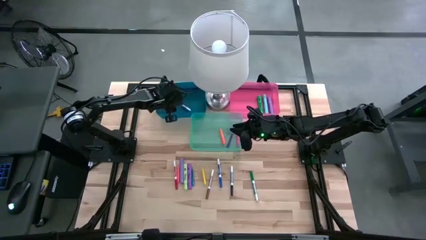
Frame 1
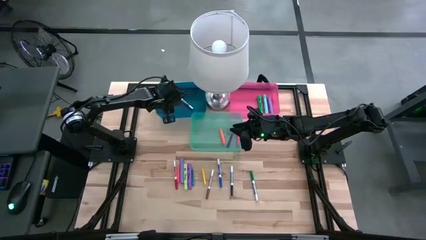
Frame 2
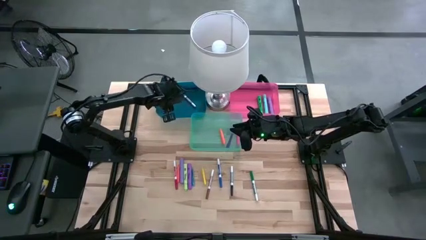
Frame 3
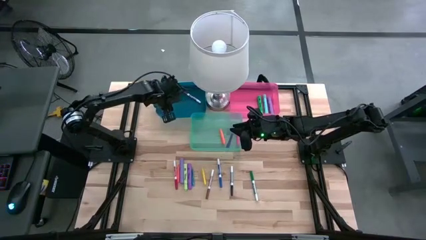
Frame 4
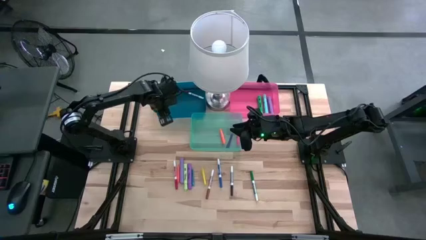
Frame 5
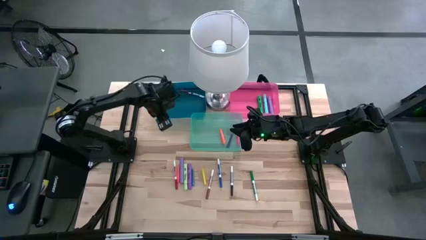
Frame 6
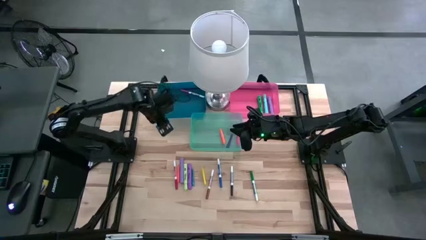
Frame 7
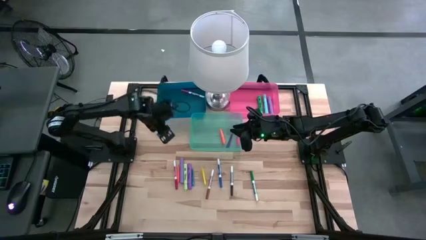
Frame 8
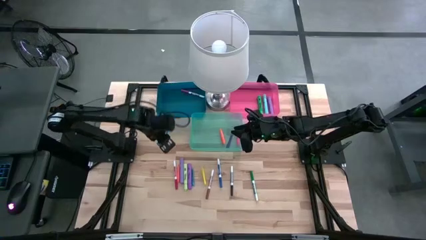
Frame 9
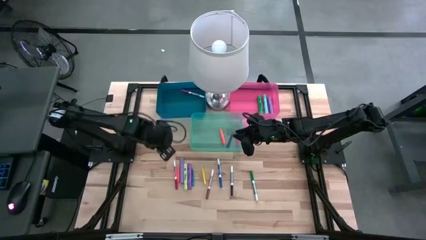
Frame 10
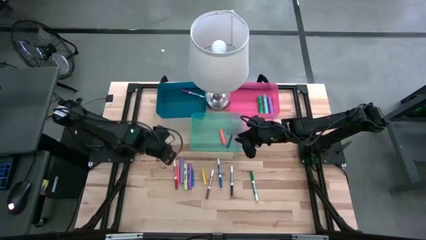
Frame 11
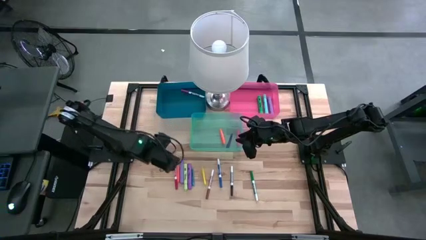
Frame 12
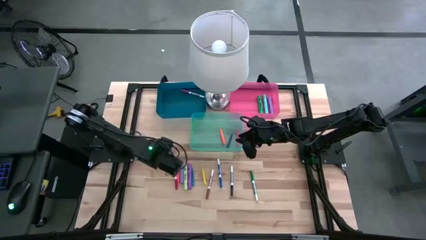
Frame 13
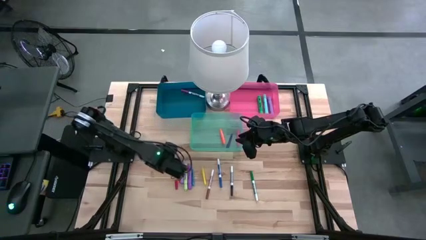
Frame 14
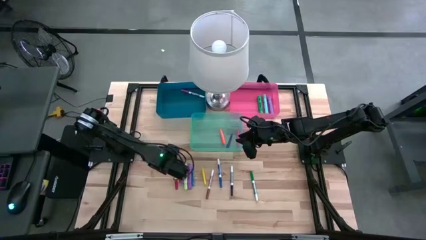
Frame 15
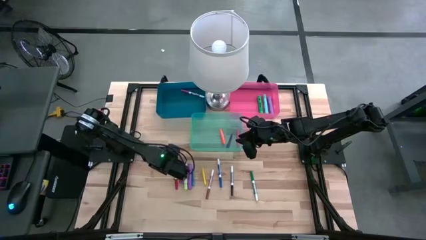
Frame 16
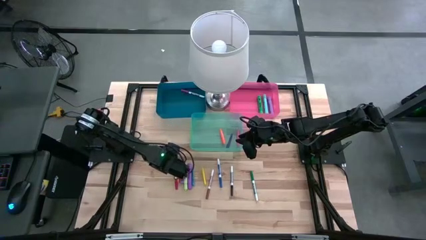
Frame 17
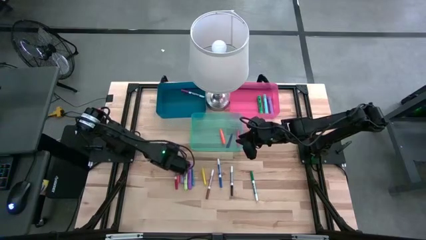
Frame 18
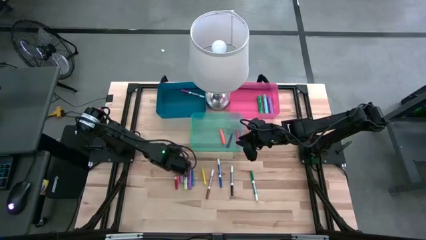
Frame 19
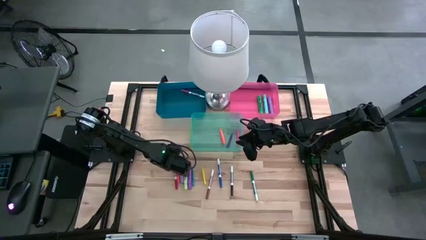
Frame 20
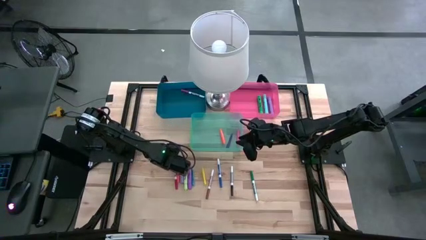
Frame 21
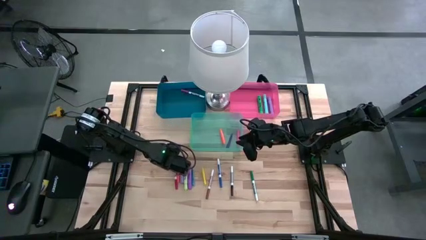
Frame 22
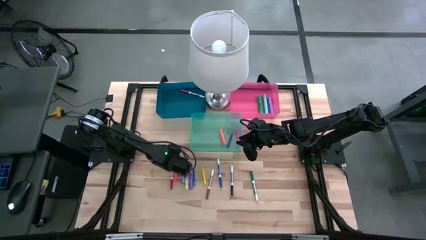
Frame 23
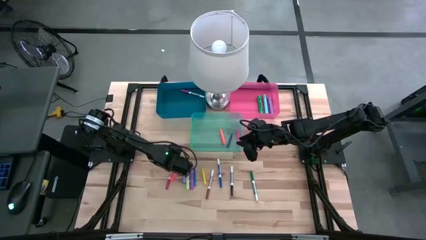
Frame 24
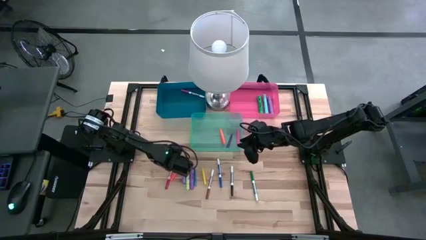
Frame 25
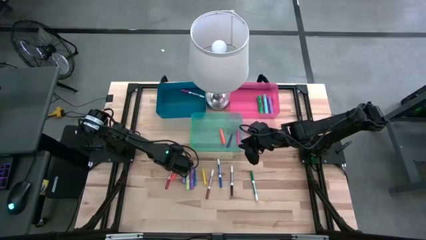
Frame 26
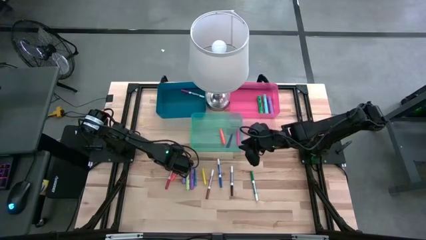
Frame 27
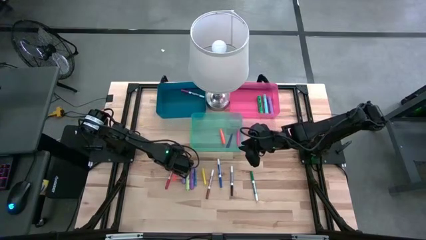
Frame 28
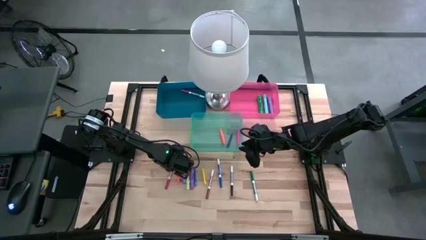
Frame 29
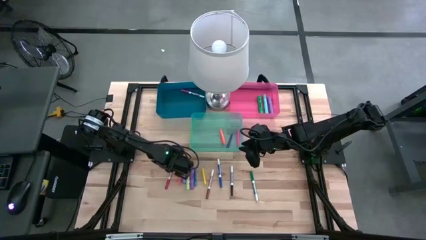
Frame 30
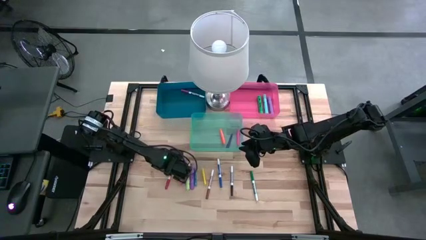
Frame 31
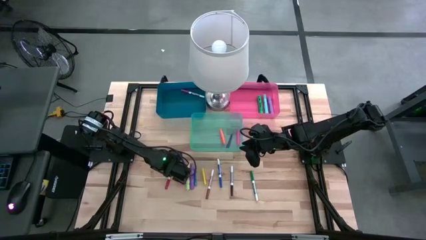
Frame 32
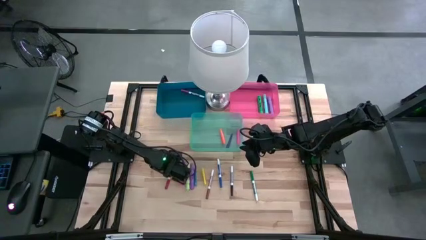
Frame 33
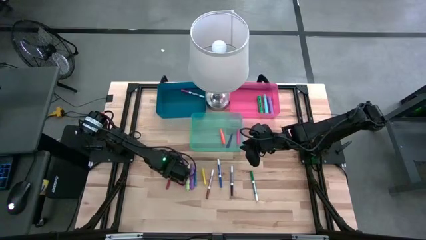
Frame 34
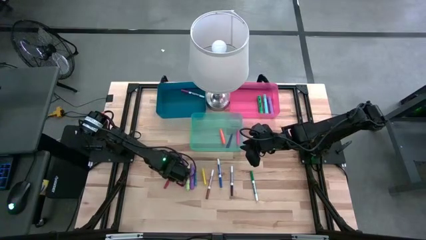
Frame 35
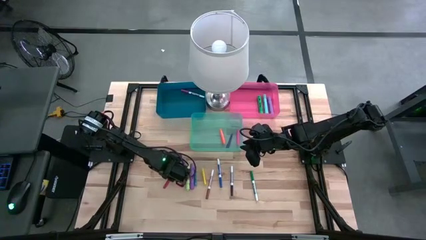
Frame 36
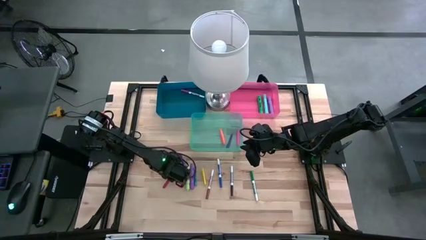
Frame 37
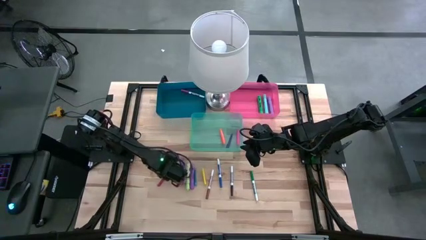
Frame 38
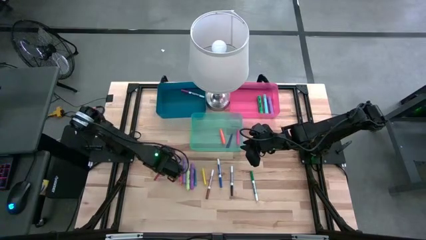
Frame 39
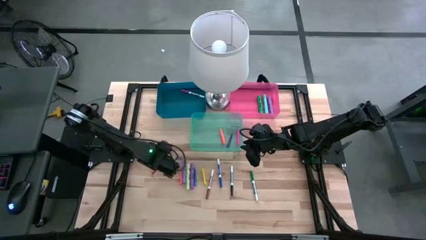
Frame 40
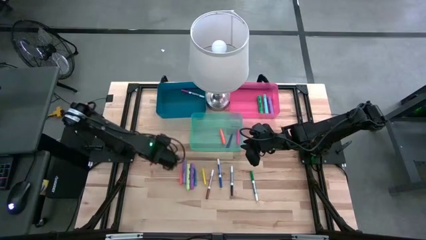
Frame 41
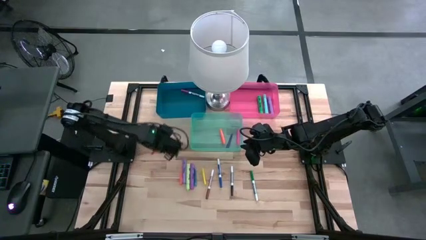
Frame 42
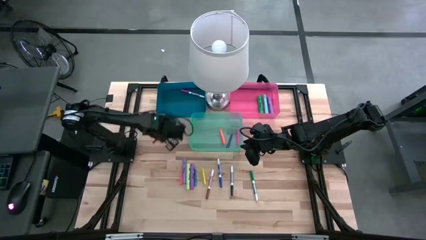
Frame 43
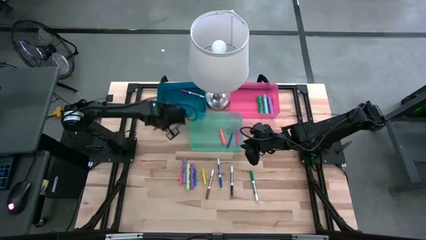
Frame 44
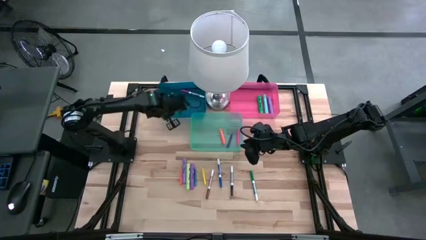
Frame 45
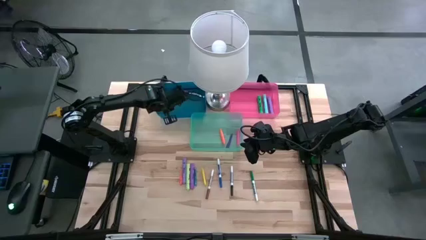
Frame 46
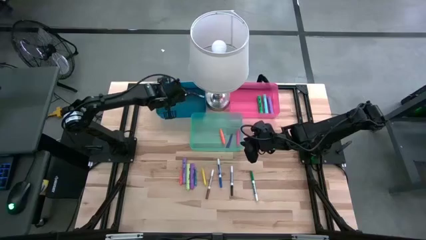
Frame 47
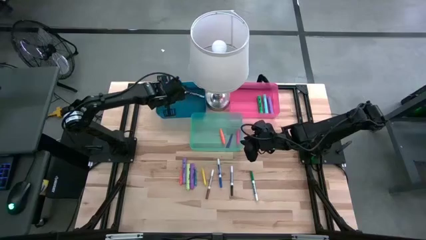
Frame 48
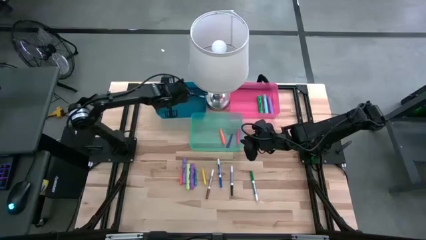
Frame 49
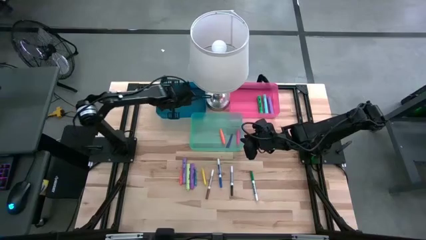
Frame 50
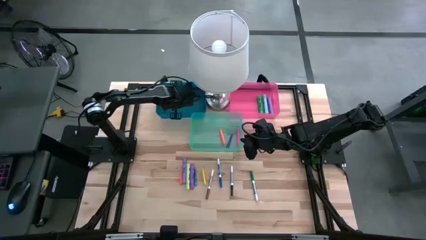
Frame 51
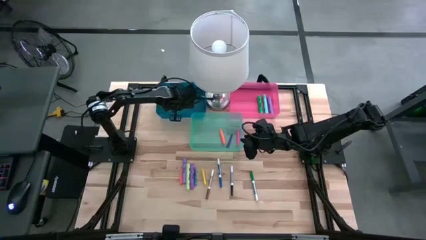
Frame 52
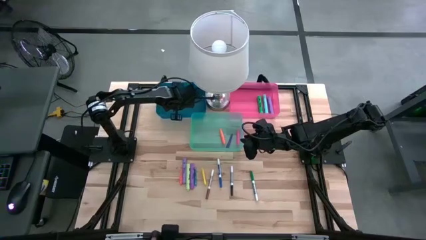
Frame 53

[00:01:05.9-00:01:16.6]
Task: Pick & Place Markers
Put the red marker pen into the blue bin

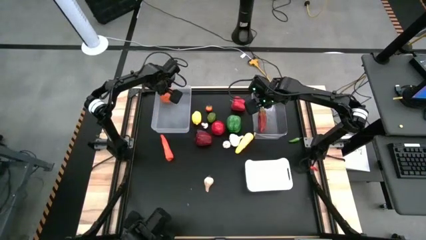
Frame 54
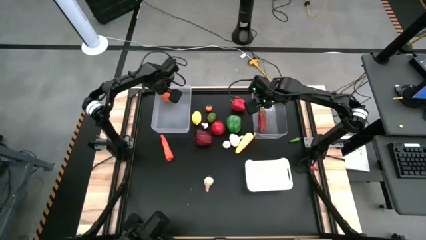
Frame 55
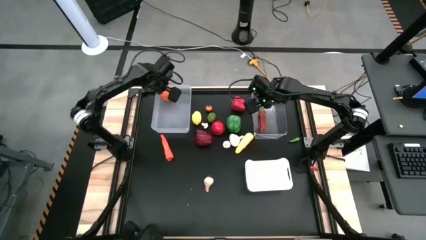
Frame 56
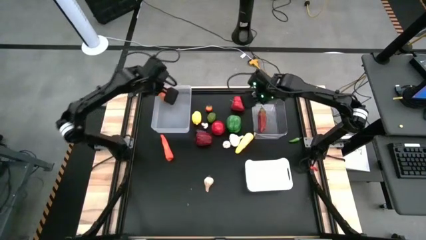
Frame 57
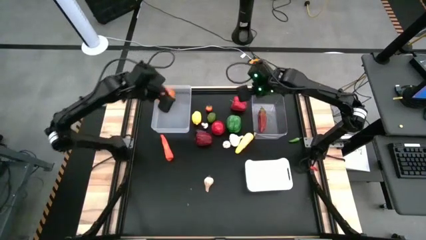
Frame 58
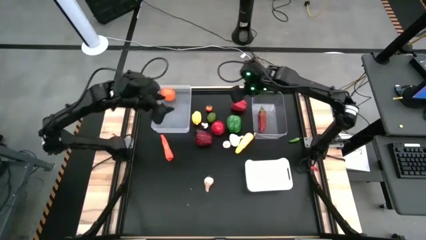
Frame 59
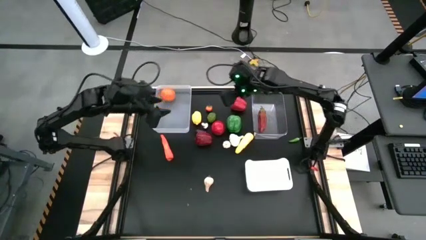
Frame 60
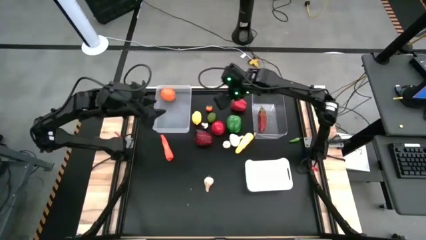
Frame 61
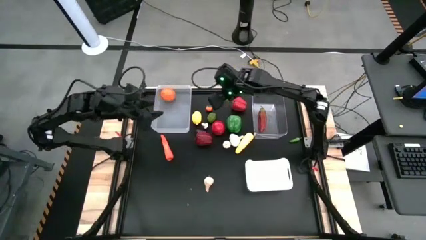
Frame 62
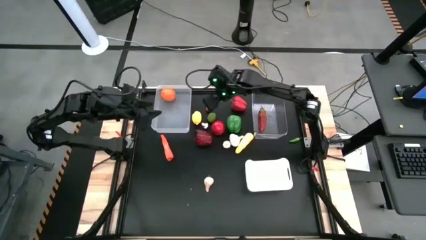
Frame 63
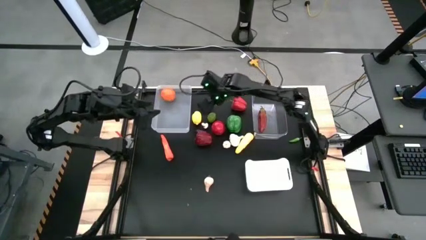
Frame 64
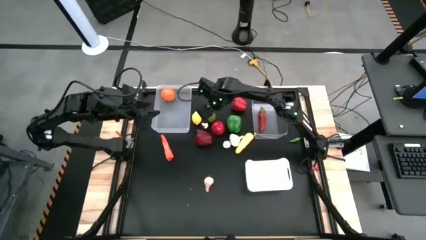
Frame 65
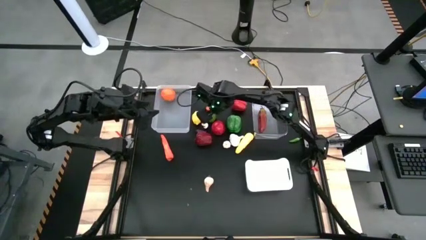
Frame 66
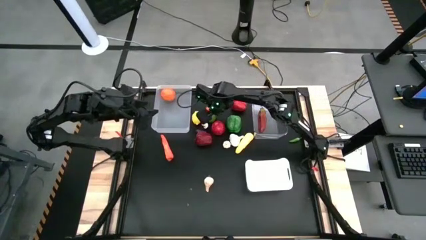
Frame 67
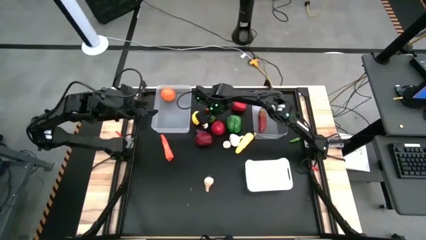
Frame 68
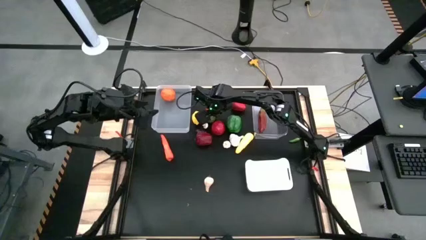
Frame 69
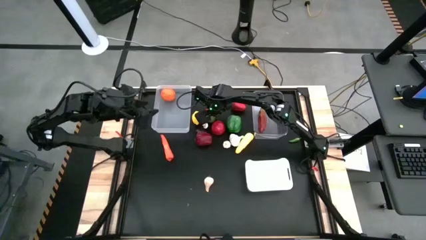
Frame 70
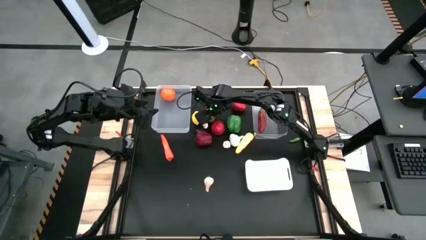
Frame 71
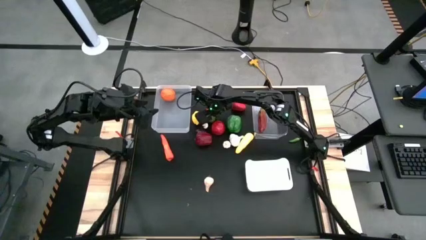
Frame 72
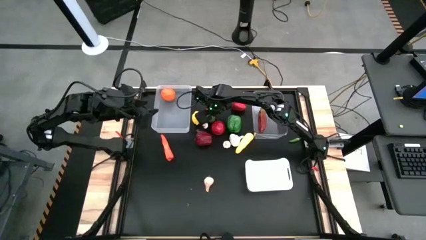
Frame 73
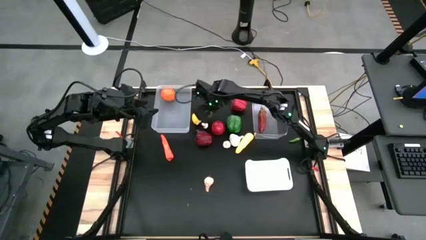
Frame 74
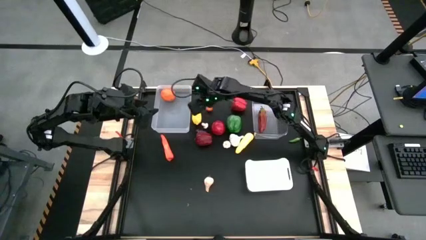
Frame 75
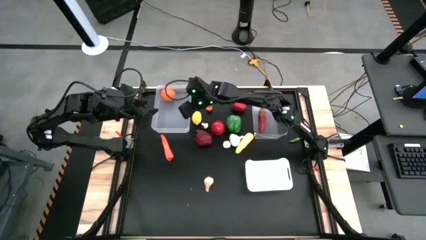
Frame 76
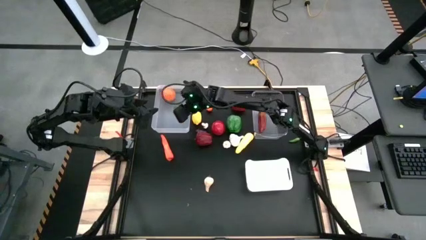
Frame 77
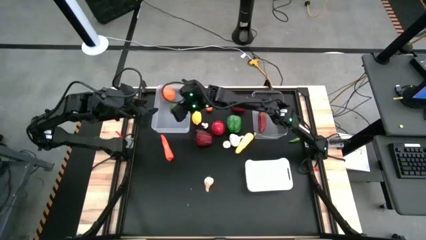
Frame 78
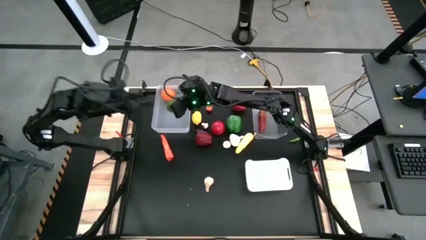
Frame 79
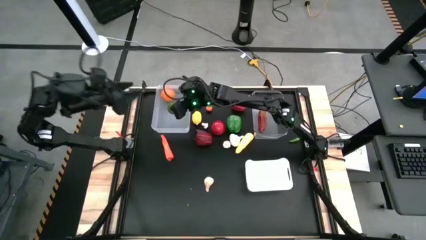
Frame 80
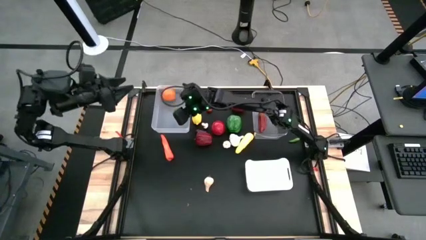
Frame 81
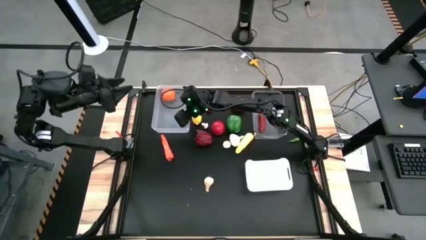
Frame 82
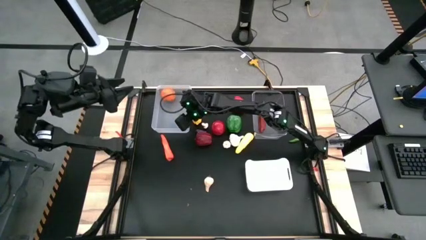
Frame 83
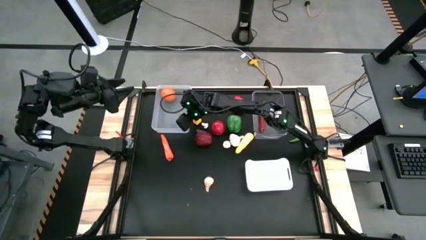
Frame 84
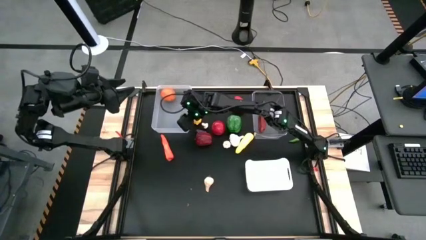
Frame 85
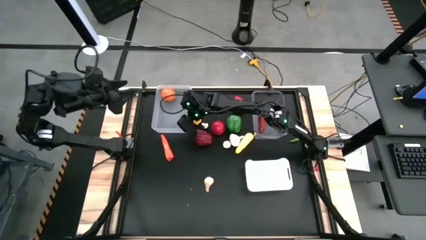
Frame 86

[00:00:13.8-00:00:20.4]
Task: Sort produce into baskets
Put green lime into the light white bin
